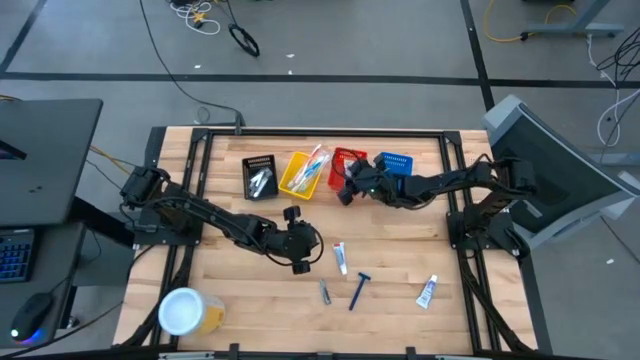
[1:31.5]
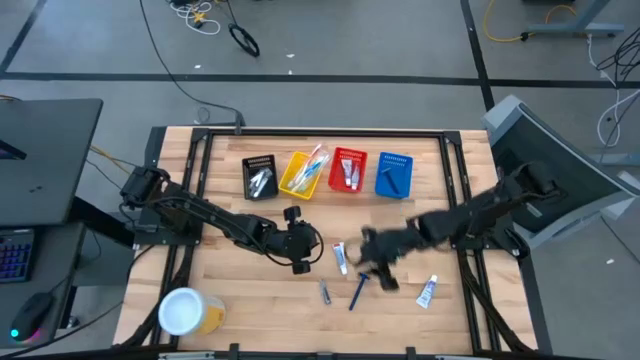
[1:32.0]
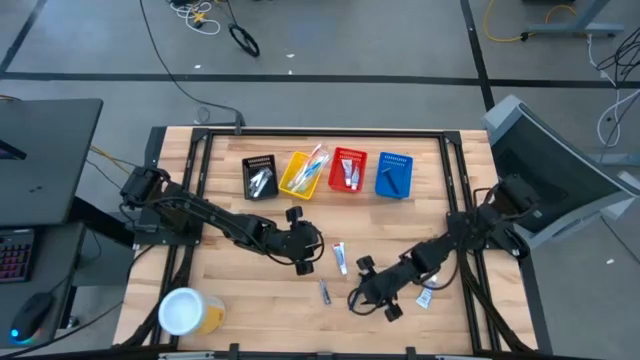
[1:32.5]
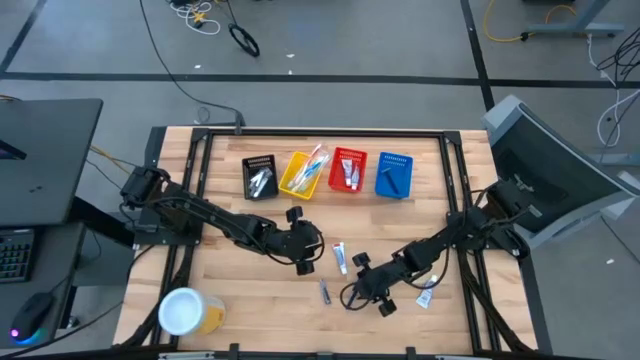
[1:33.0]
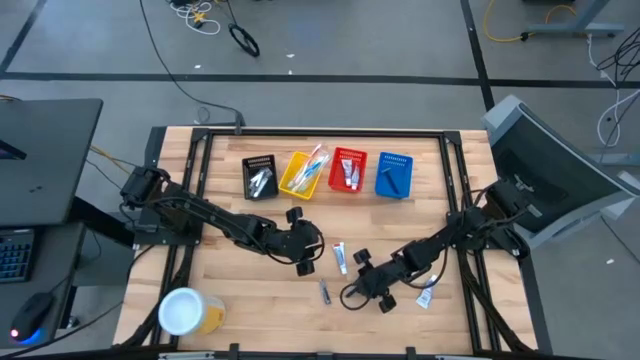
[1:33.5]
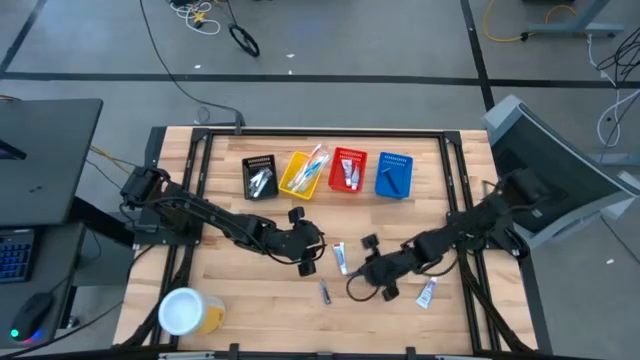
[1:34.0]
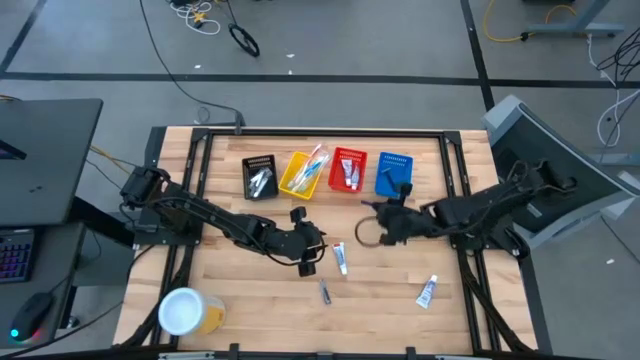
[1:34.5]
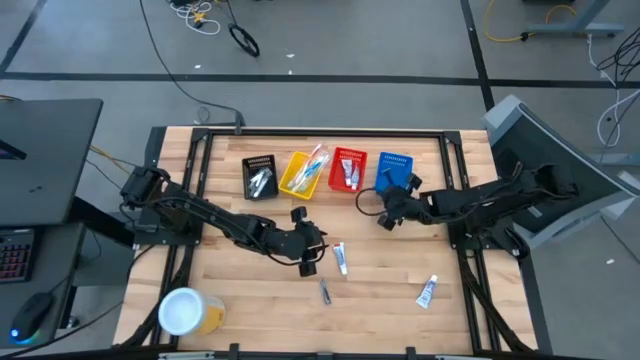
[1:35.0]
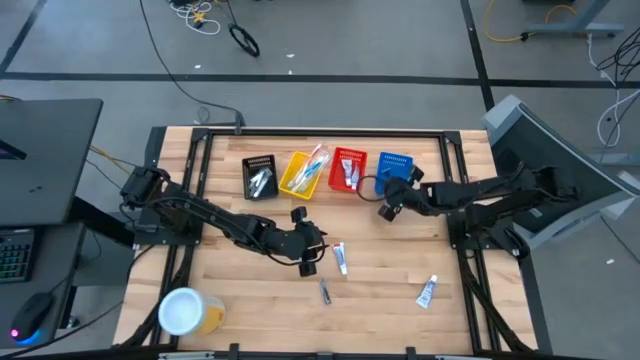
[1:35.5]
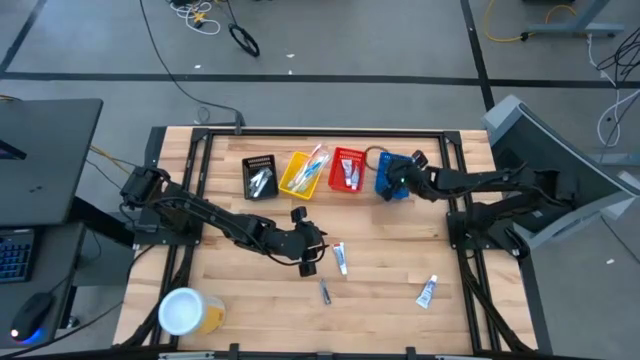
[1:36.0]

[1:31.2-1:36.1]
Task: Pick & Place Travel size toiletries
Put the blue razor into the blue bin

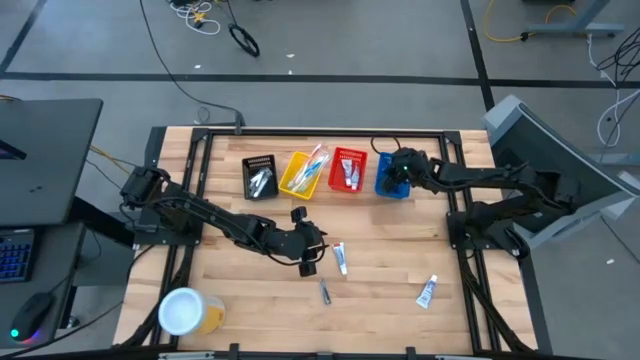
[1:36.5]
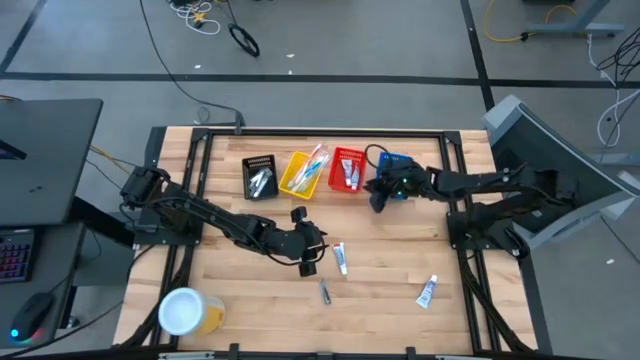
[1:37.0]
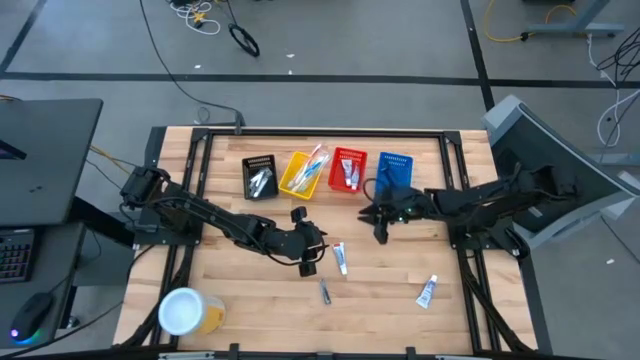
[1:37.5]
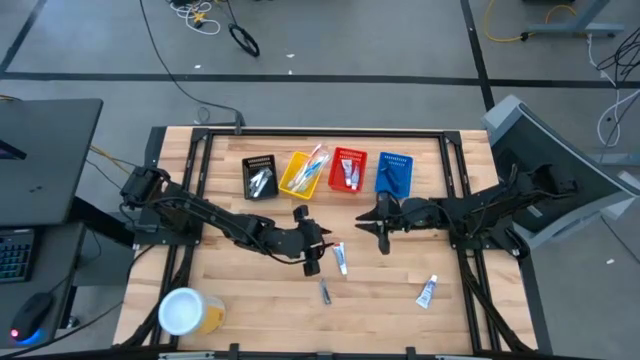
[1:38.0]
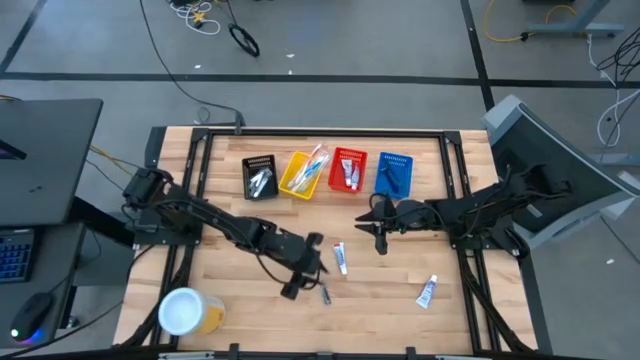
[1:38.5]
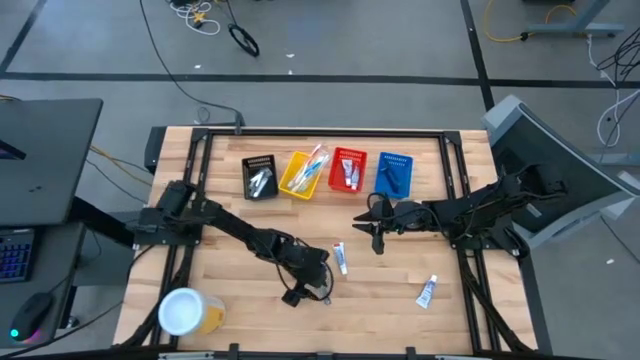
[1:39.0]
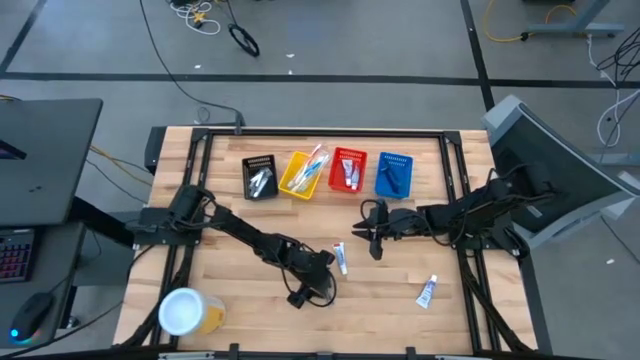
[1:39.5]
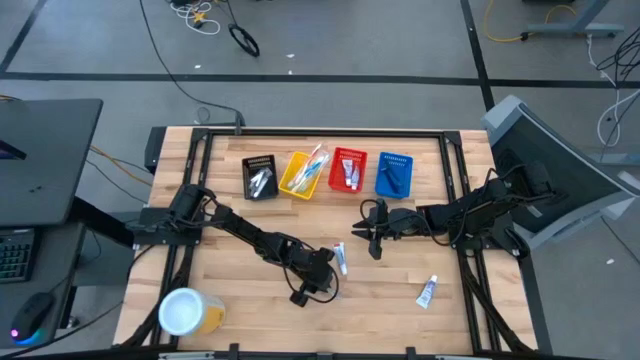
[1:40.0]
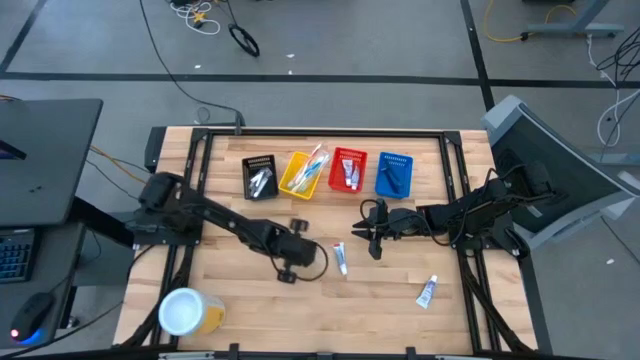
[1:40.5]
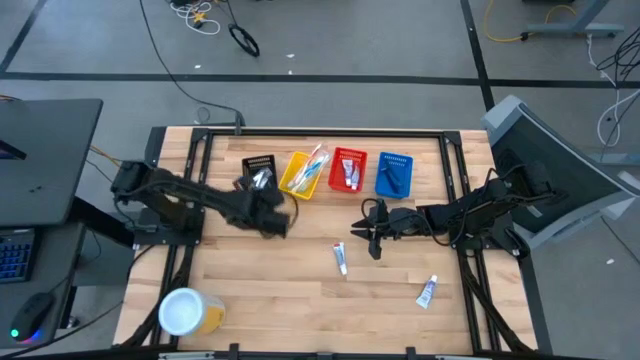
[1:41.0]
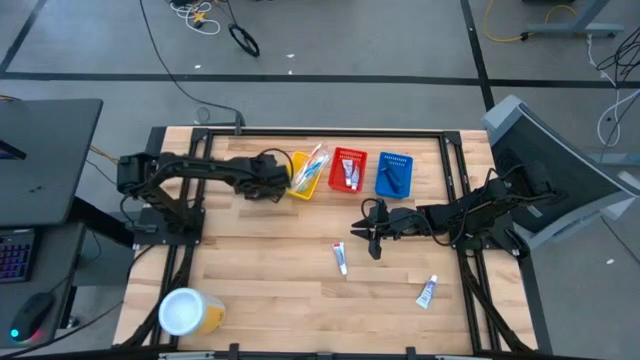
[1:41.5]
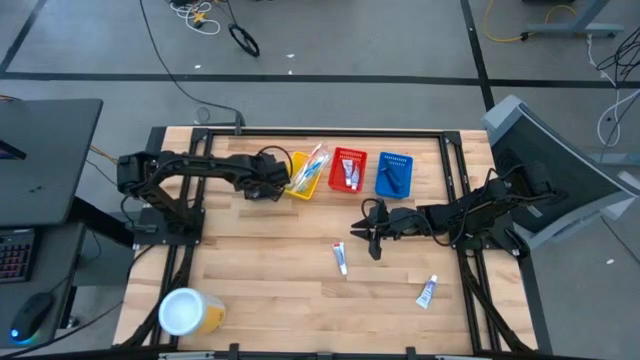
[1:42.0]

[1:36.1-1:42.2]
Put the silver nail cutter into the black bin

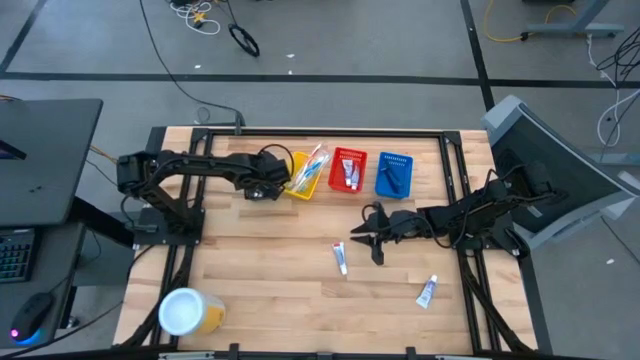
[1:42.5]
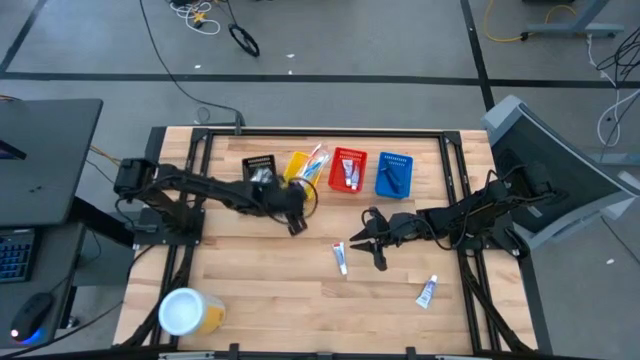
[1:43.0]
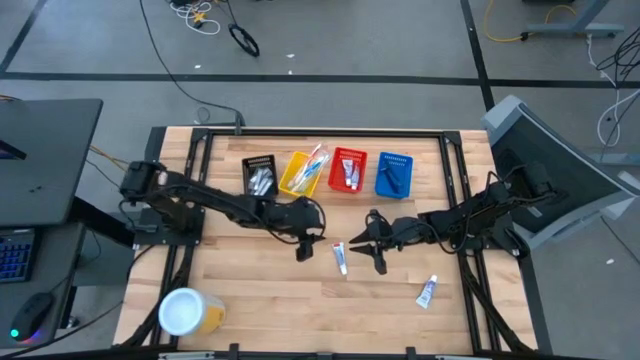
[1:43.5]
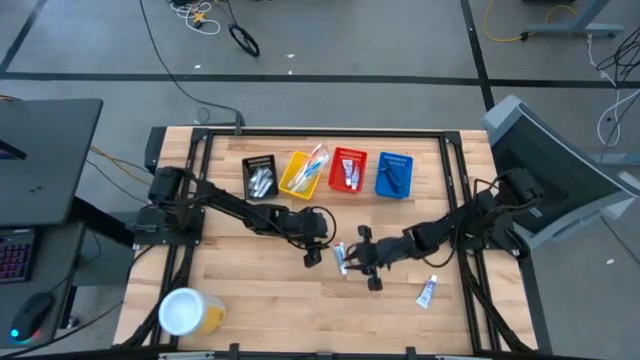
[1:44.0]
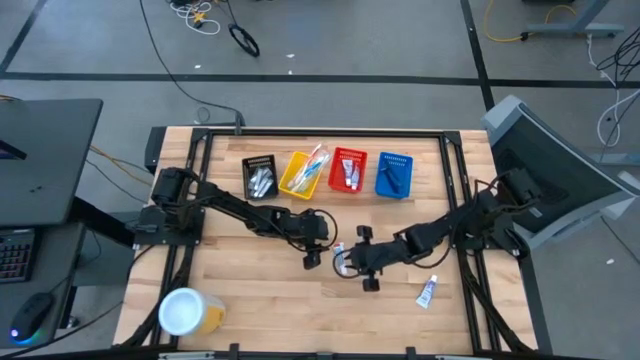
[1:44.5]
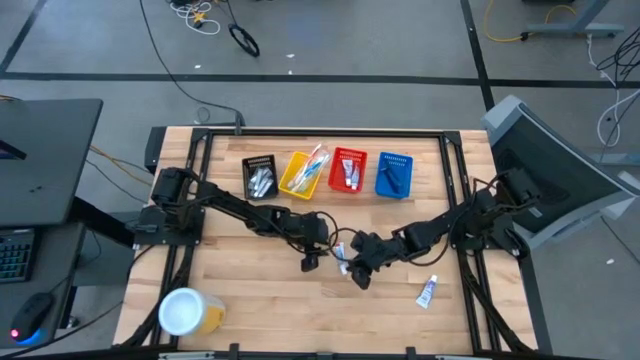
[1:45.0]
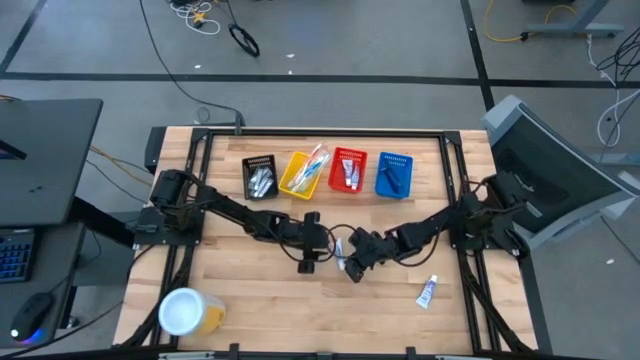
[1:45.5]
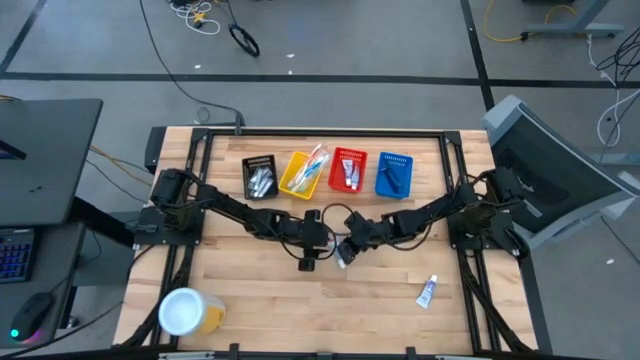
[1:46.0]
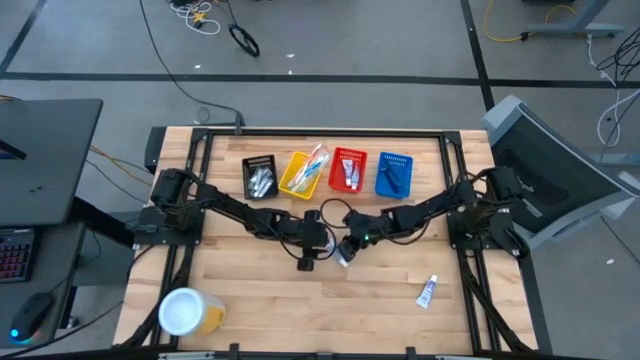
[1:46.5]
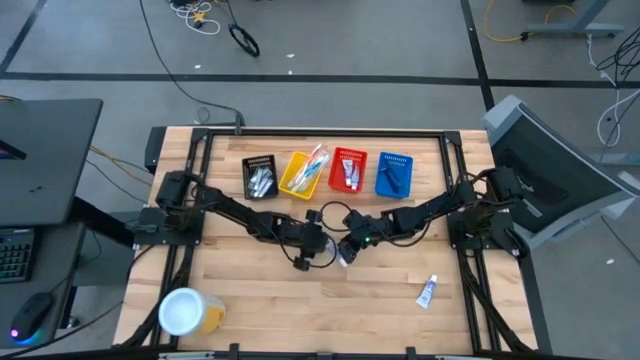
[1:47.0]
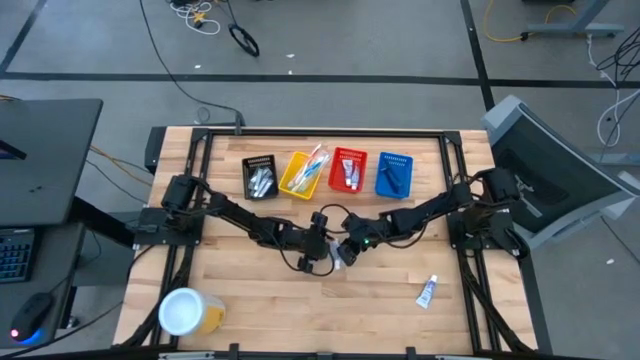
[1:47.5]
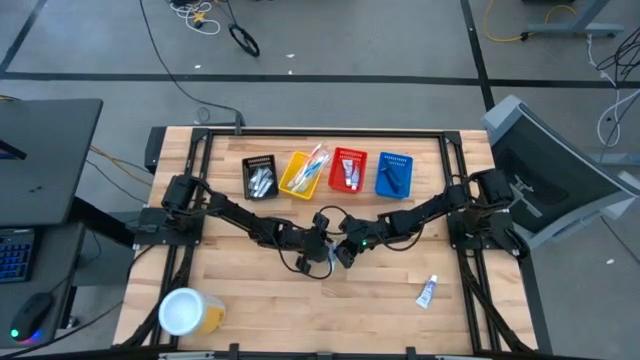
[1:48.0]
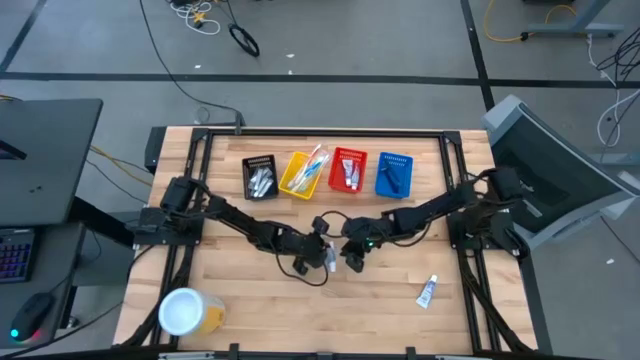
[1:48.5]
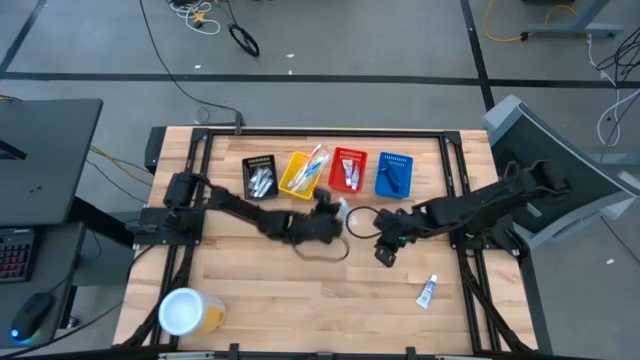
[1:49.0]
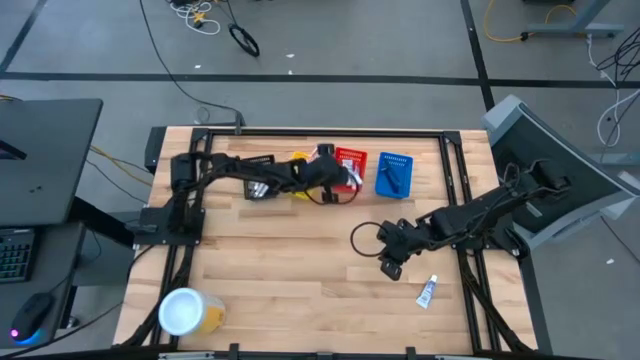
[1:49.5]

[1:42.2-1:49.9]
Put the white toothpaste into the red bin

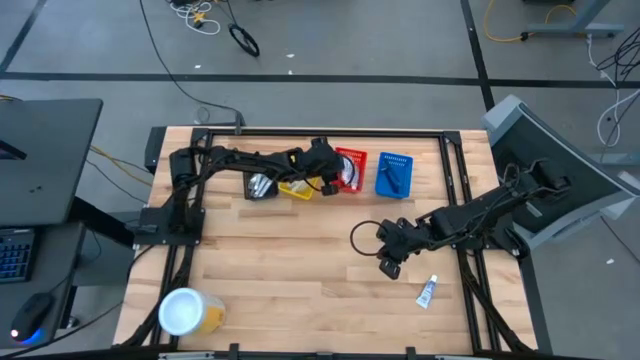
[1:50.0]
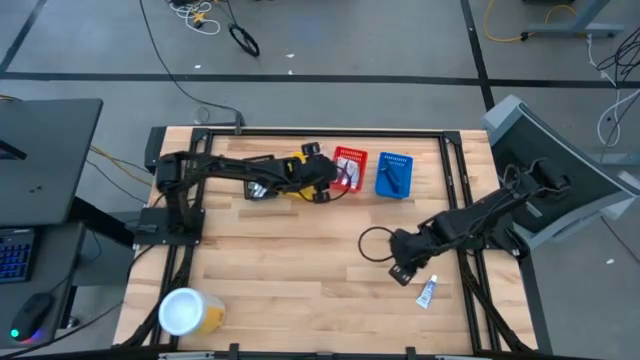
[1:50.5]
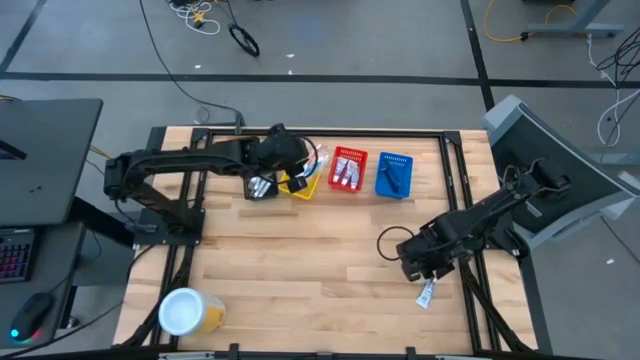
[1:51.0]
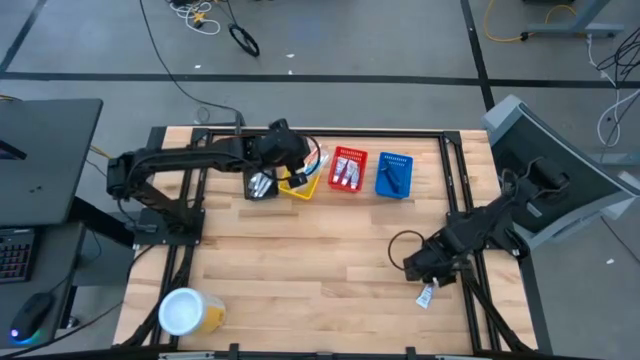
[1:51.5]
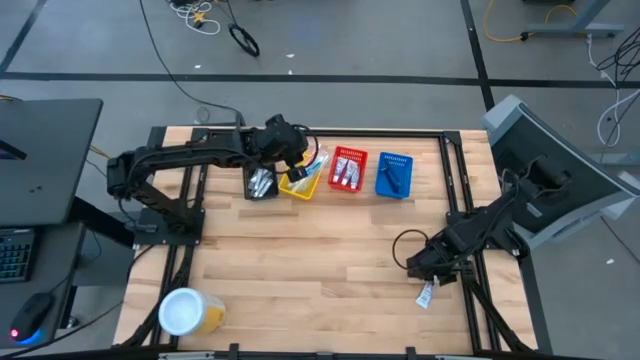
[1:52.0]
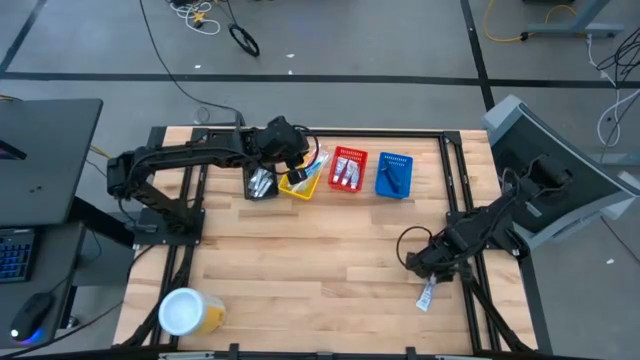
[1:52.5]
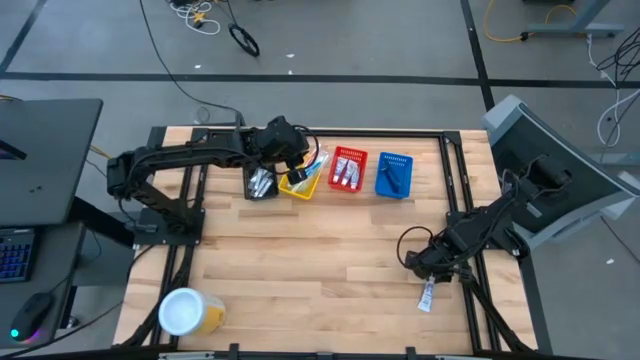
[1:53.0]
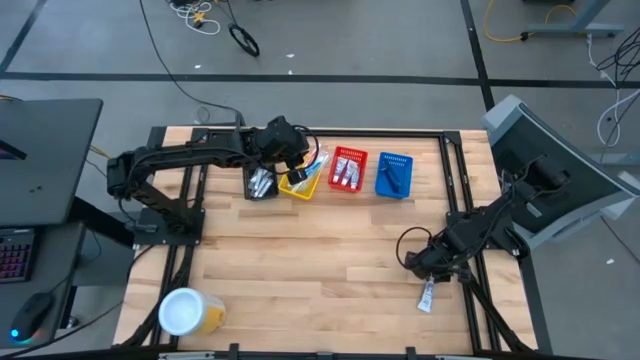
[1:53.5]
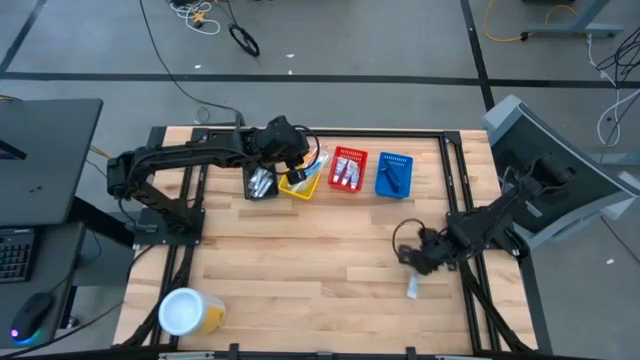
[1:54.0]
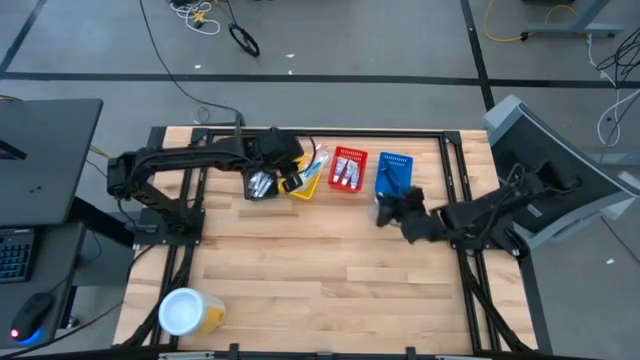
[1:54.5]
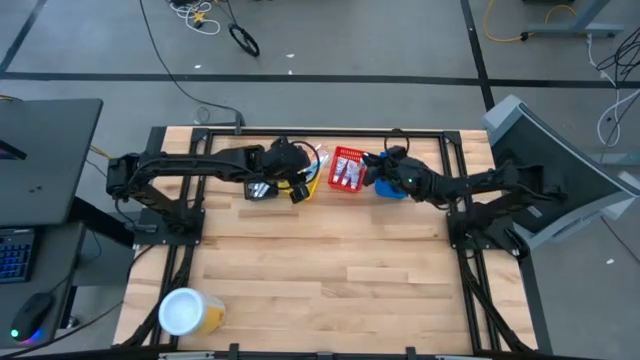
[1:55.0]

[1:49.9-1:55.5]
Put the white toothpaste into the red bin
